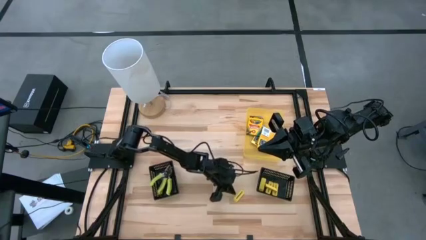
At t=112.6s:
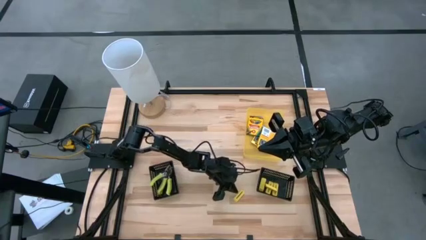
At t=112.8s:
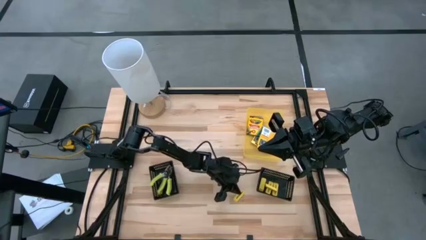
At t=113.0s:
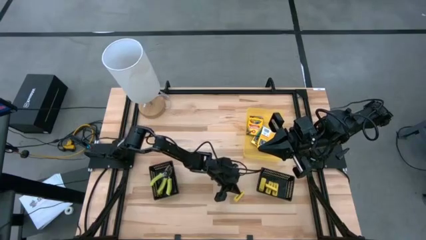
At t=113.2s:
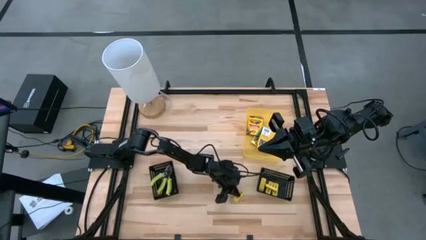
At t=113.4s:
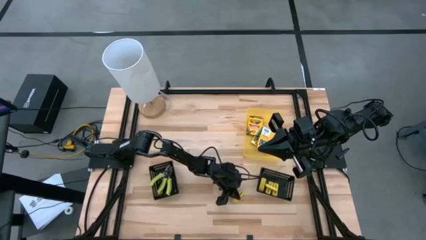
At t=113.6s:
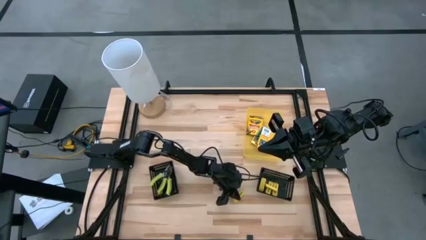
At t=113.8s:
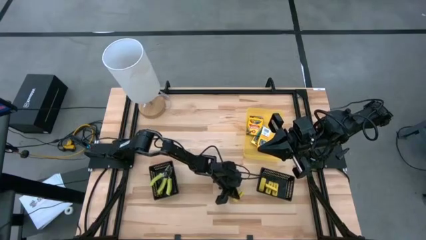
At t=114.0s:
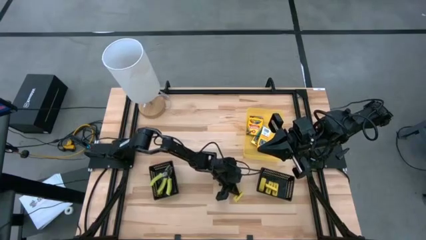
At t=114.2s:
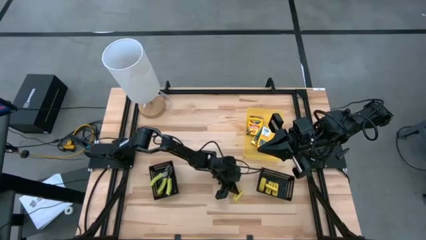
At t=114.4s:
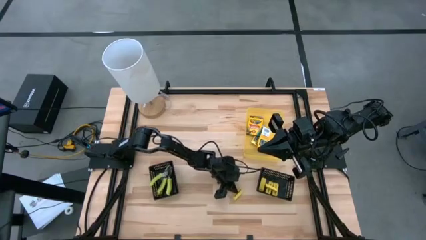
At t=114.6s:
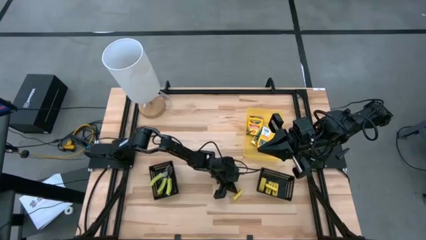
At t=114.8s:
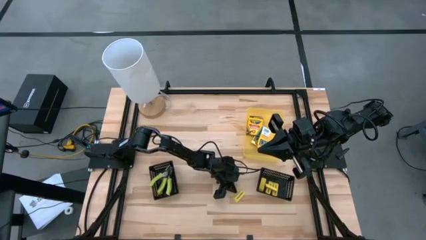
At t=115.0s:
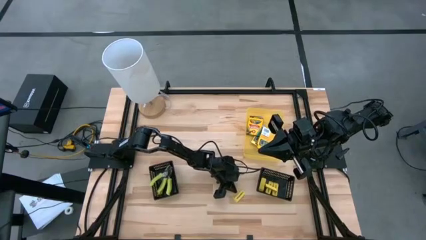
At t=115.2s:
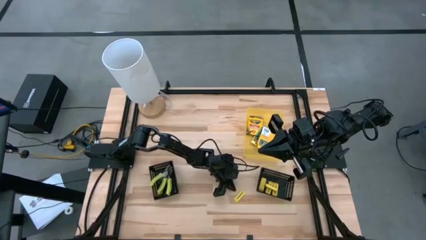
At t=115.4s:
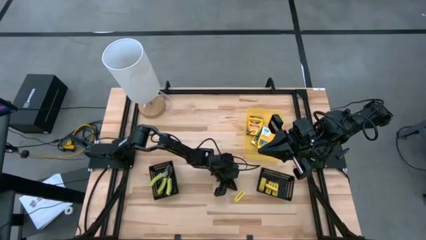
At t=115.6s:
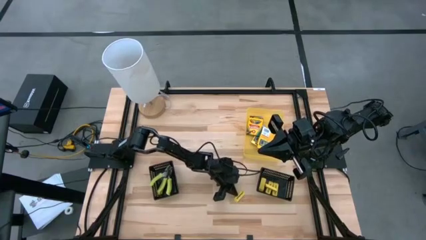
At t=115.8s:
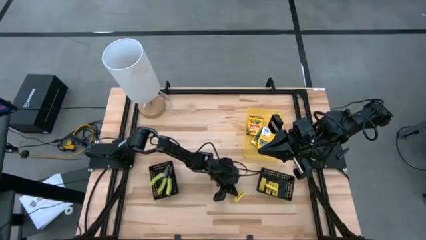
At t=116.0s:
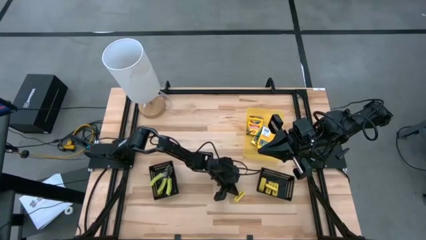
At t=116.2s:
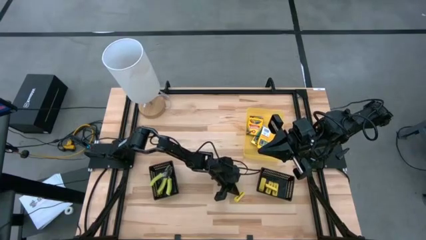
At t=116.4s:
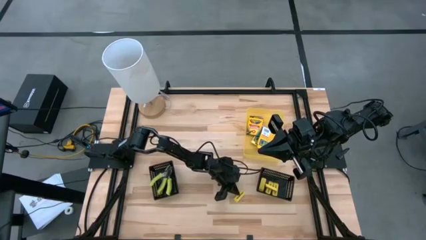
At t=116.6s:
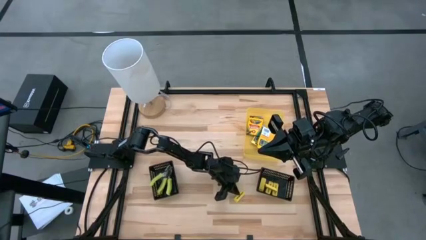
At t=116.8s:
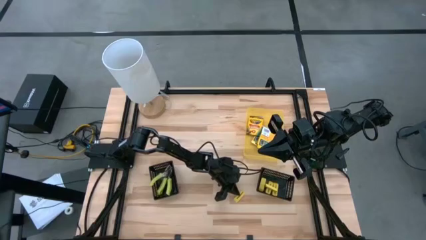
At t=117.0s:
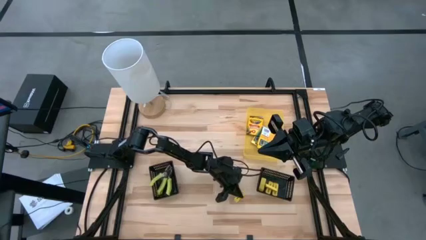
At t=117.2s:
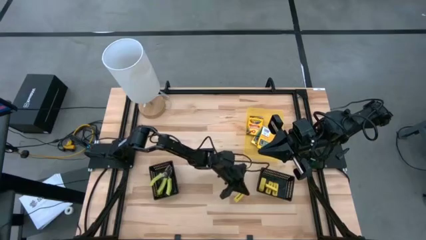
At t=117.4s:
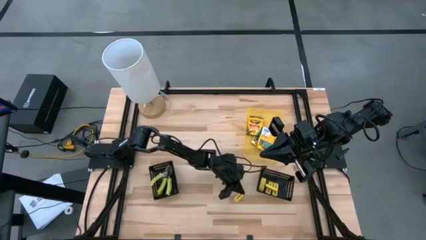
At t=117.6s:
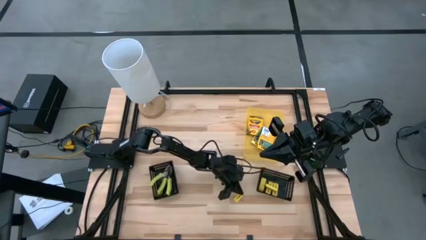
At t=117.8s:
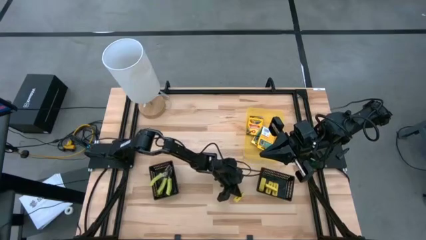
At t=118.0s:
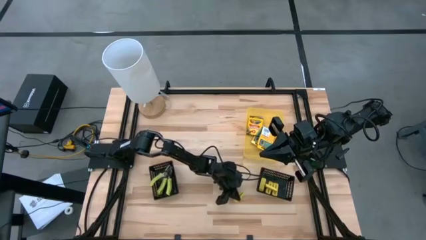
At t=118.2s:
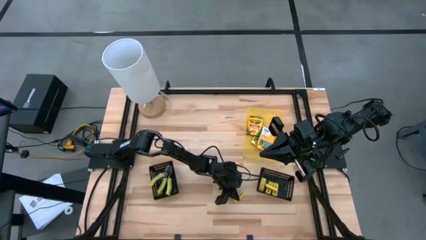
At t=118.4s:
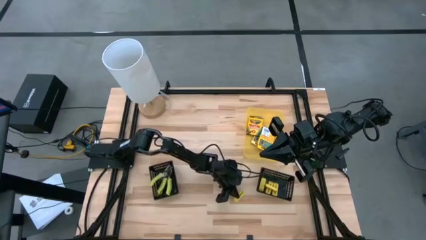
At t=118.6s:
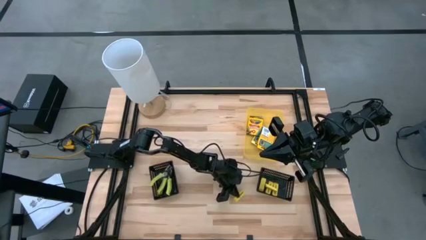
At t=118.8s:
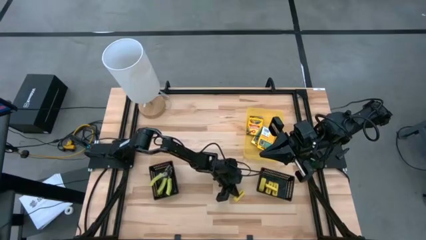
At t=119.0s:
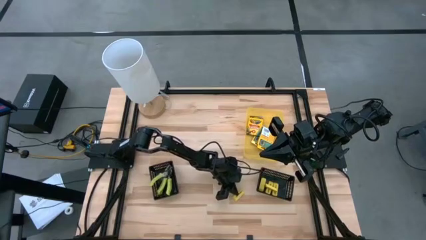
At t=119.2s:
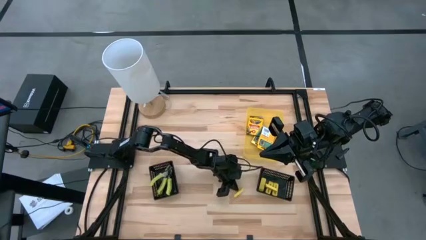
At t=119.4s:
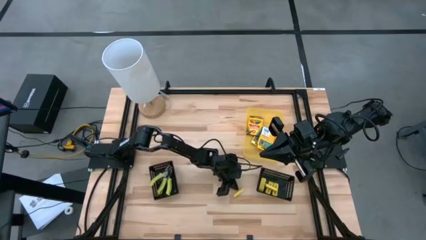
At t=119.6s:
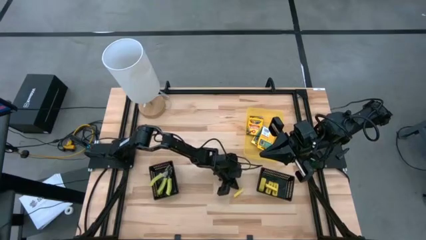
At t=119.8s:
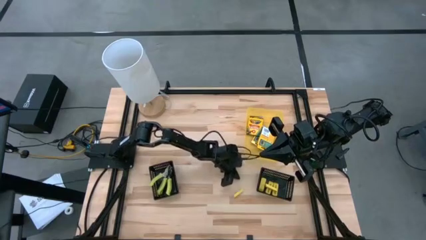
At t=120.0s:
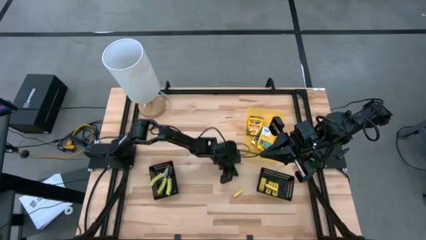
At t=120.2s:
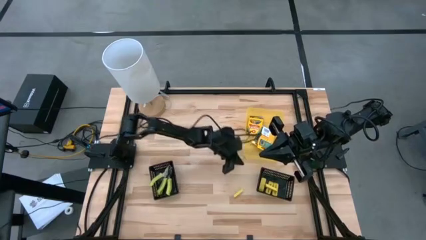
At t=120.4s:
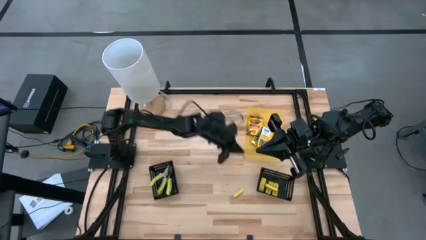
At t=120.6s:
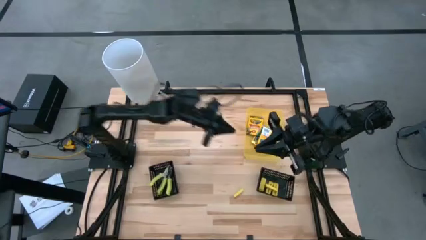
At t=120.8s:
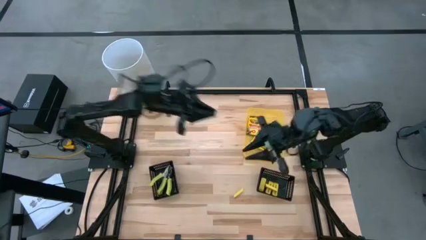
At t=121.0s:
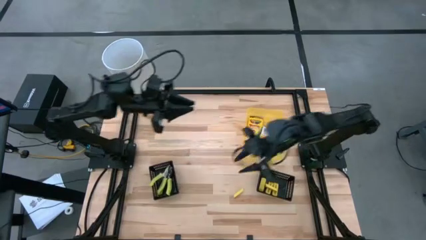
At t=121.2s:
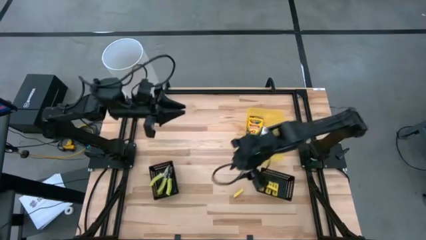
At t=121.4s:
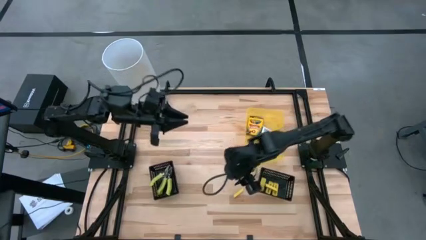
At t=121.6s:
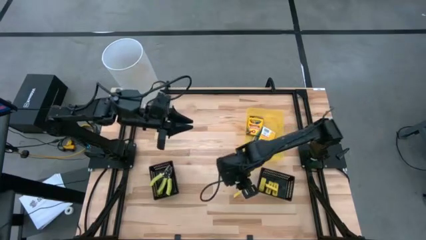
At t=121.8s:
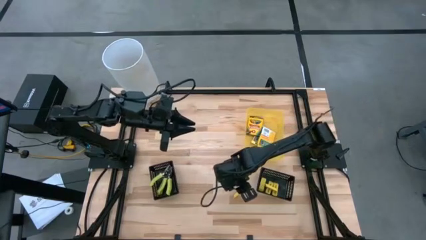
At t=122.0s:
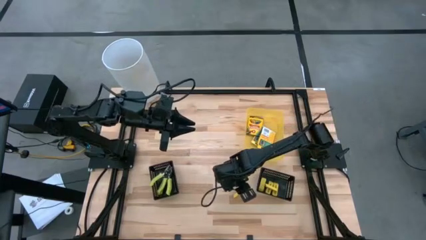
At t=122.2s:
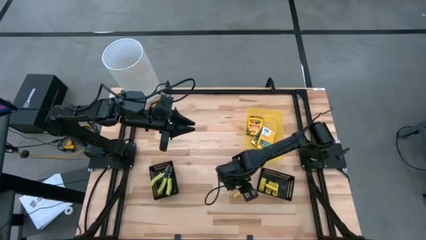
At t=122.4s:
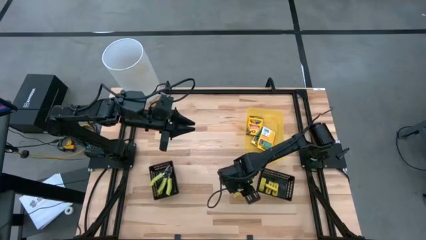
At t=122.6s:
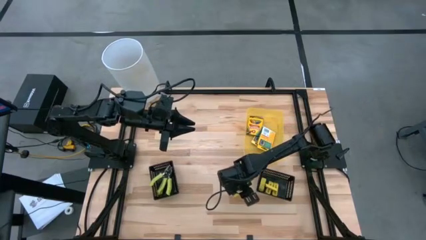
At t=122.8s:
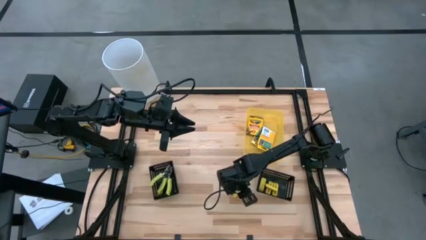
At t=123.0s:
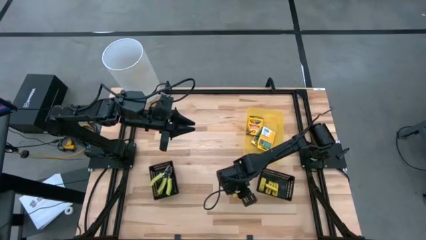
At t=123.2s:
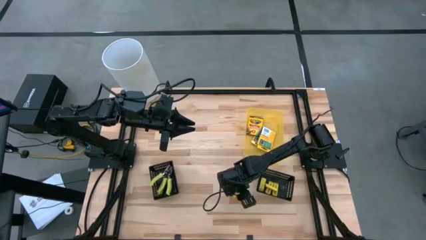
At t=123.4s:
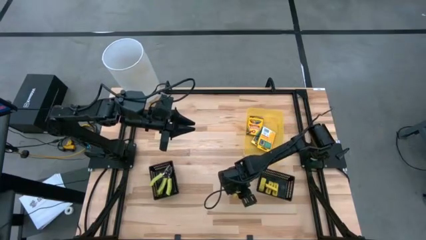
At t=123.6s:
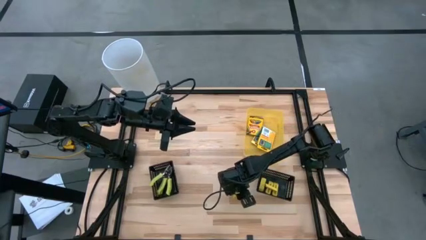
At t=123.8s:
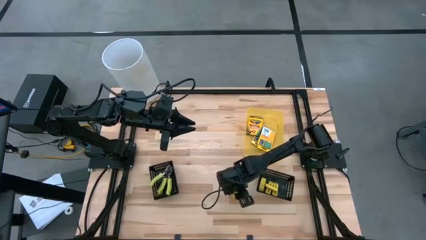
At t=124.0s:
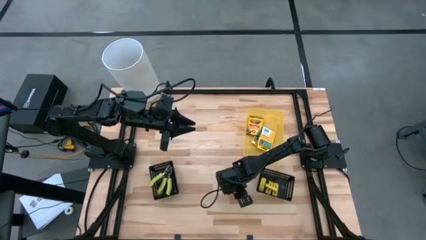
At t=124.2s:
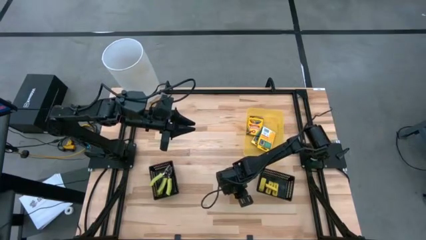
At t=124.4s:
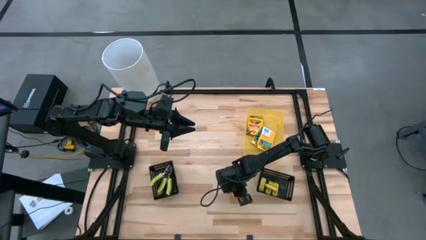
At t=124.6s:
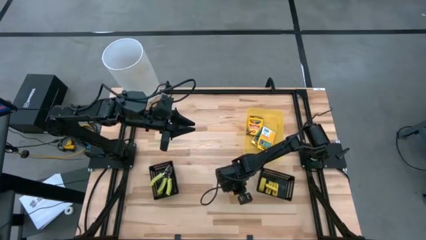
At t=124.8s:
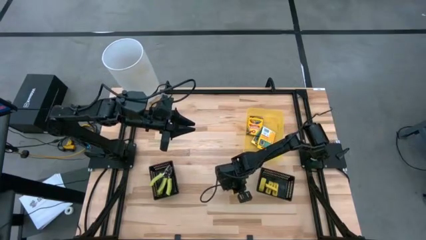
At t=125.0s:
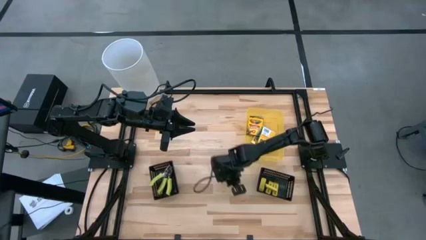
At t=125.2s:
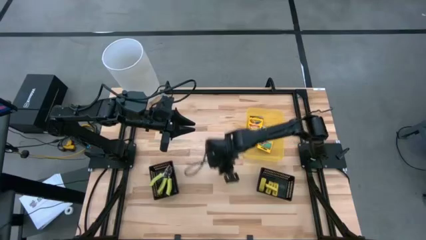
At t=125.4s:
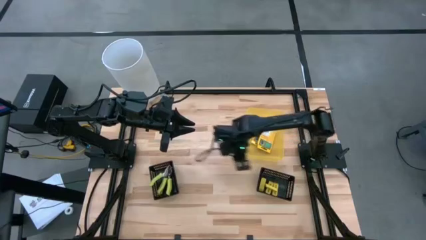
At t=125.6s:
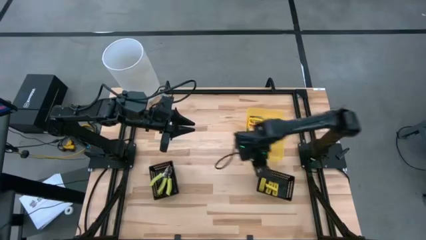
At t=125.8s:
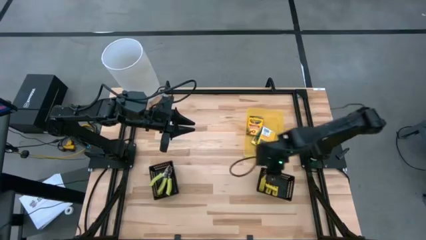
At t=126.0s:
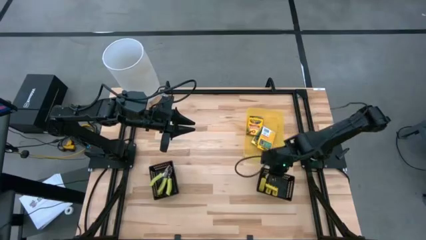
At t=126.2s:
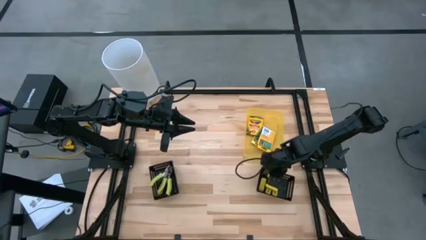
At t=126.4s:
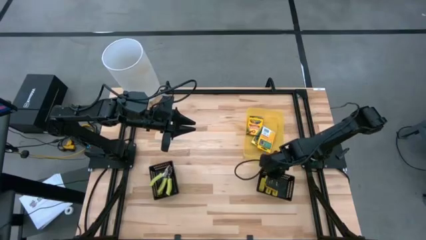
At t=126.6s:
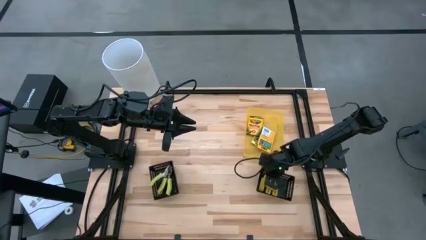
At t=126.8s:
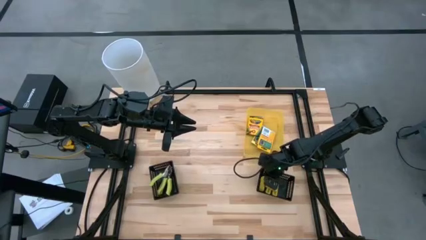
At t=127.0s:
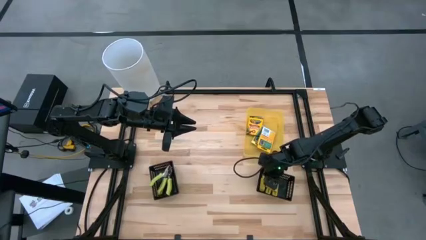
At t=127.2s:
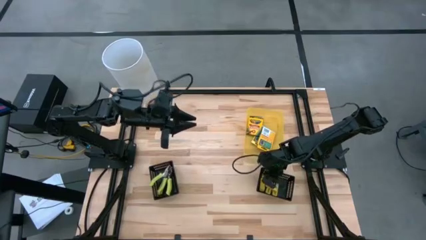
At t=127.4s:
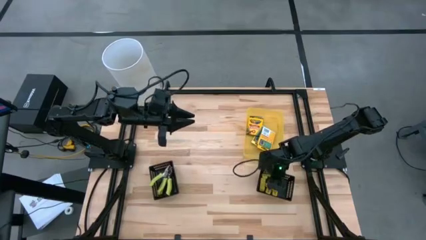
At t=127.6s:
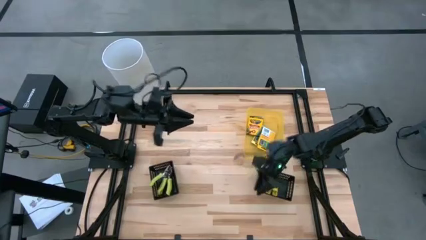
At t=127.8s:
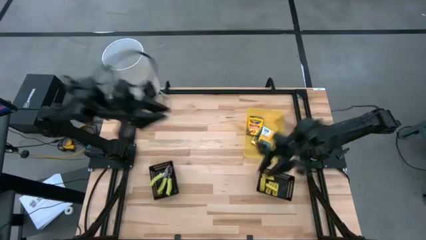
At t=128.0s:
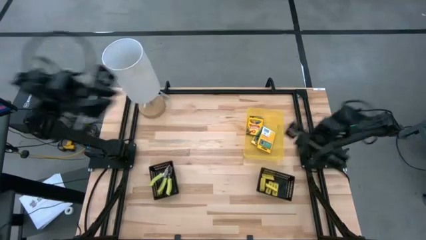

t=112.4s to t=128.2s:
Task: Pick & Place School Supplies
Put the eraser into the right black bin
